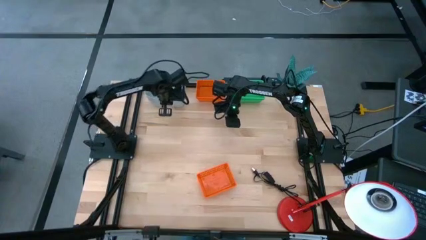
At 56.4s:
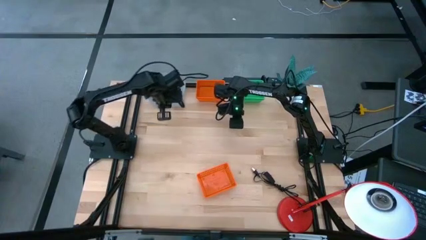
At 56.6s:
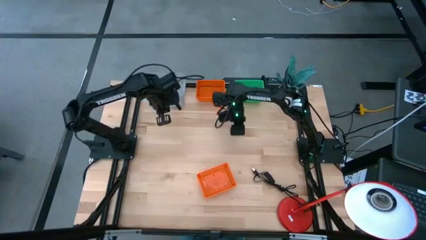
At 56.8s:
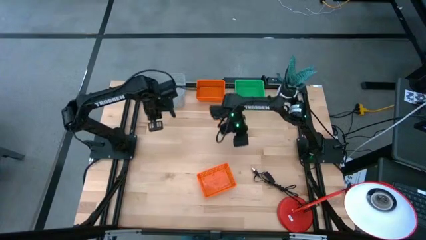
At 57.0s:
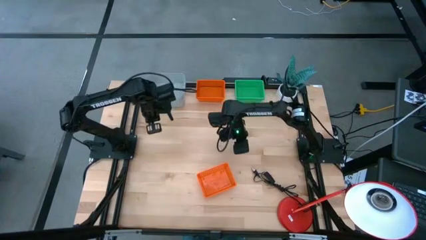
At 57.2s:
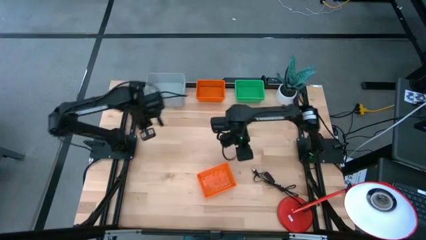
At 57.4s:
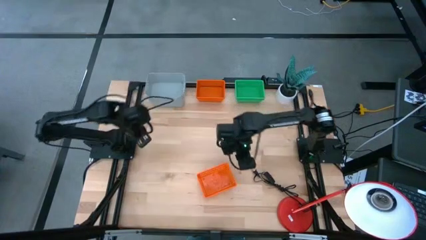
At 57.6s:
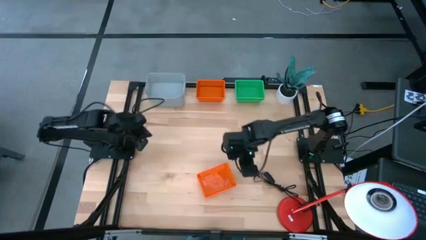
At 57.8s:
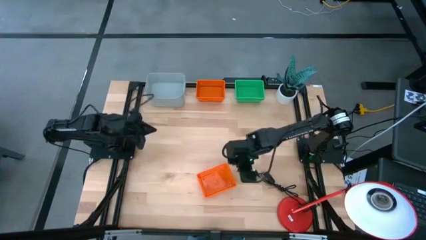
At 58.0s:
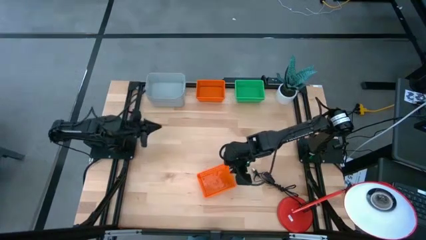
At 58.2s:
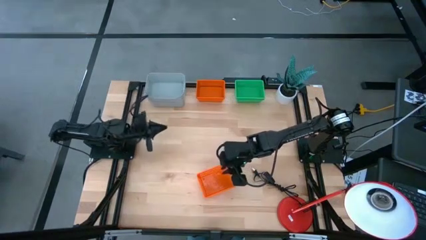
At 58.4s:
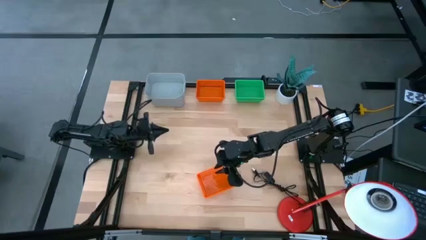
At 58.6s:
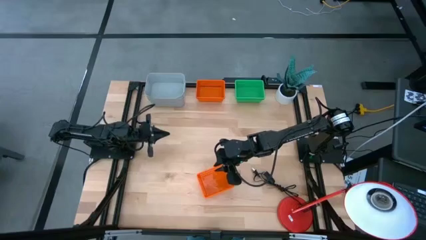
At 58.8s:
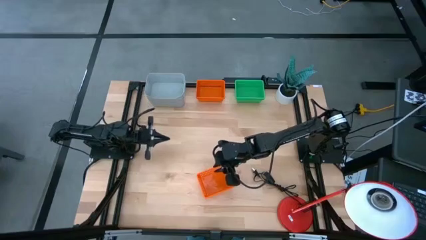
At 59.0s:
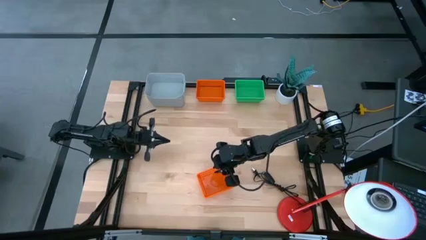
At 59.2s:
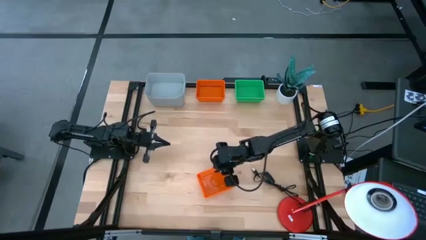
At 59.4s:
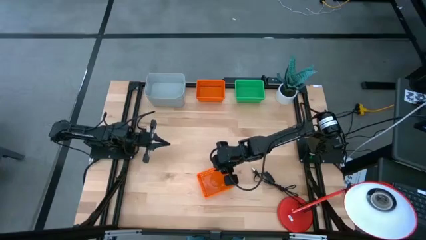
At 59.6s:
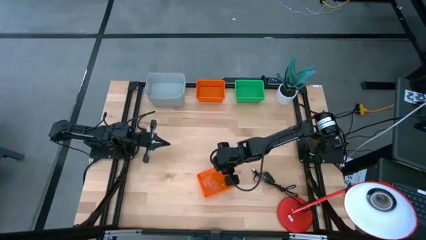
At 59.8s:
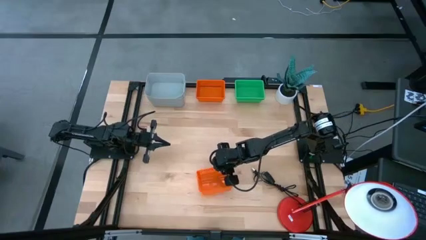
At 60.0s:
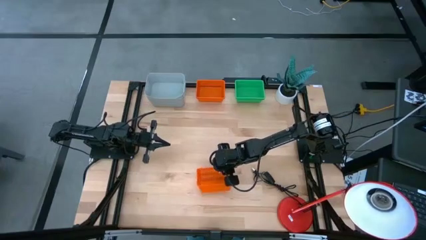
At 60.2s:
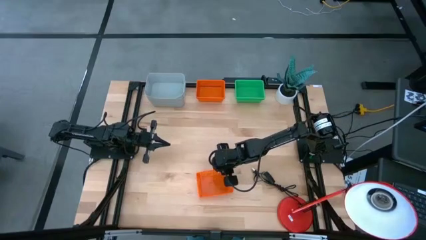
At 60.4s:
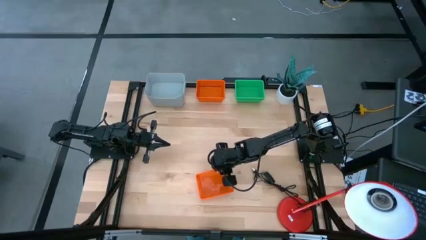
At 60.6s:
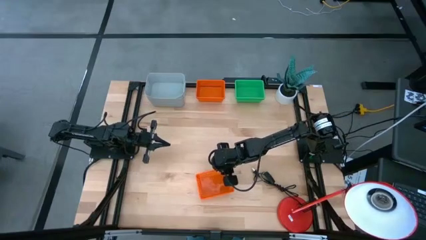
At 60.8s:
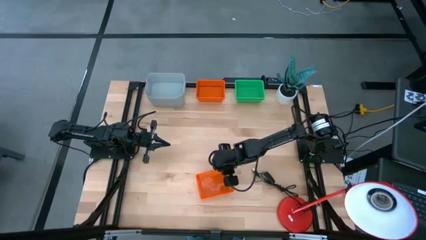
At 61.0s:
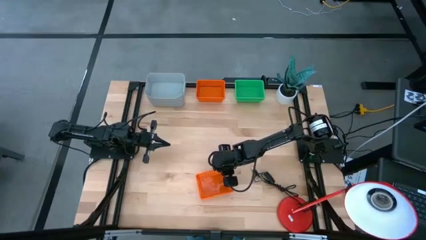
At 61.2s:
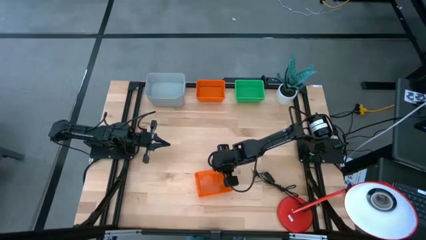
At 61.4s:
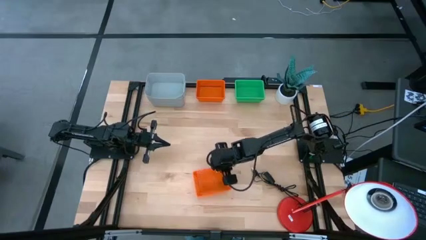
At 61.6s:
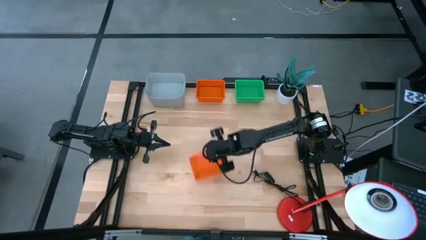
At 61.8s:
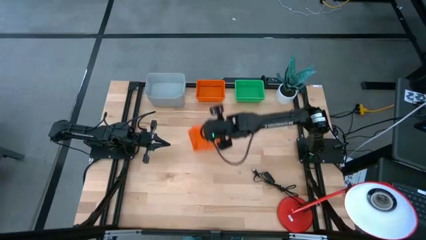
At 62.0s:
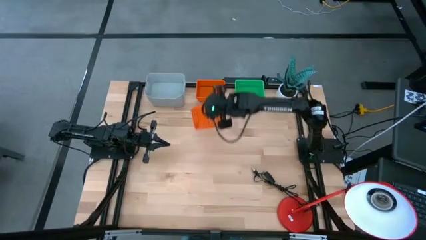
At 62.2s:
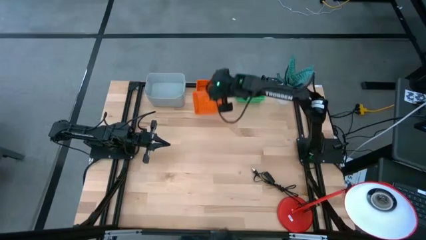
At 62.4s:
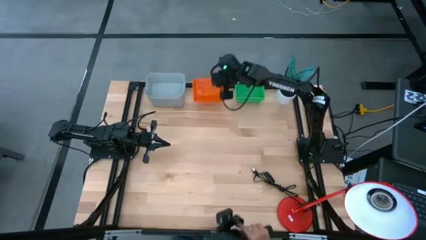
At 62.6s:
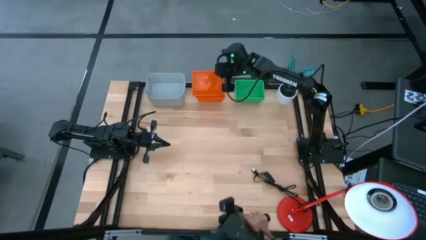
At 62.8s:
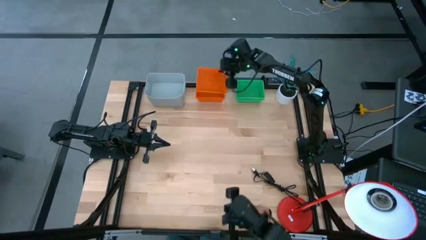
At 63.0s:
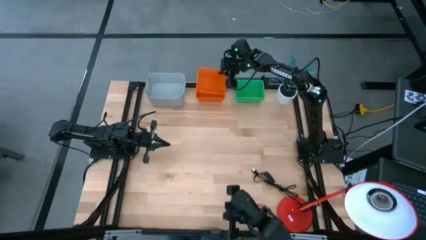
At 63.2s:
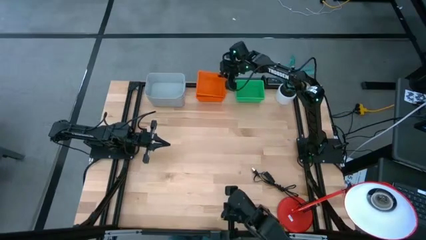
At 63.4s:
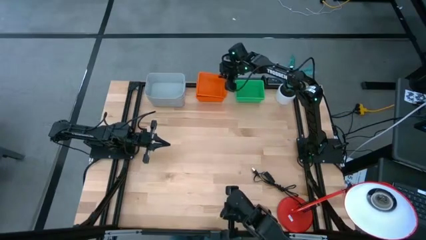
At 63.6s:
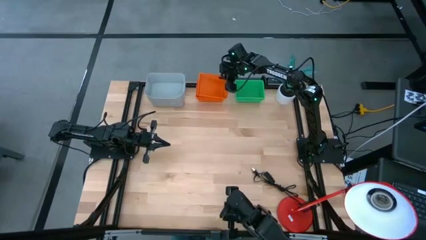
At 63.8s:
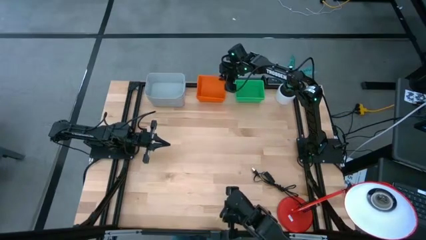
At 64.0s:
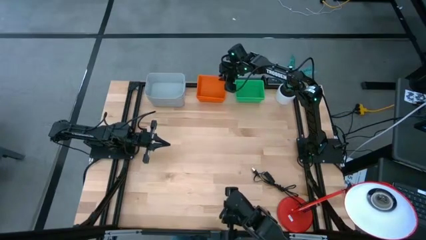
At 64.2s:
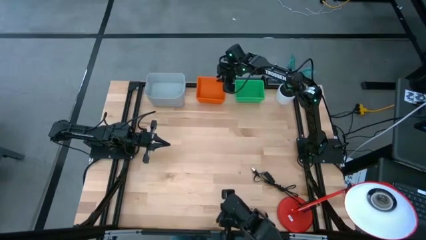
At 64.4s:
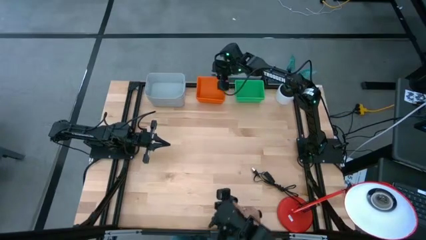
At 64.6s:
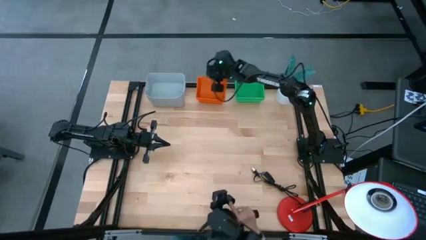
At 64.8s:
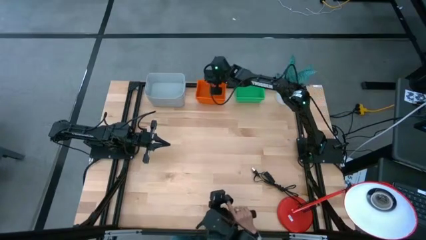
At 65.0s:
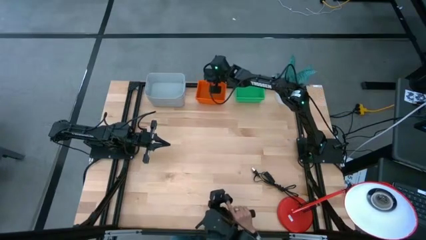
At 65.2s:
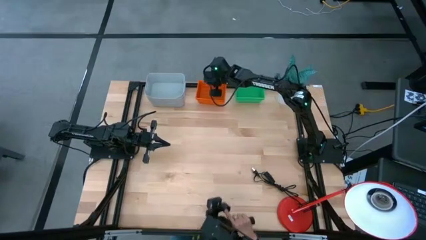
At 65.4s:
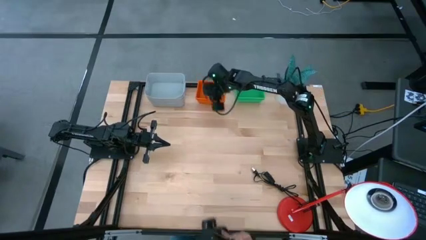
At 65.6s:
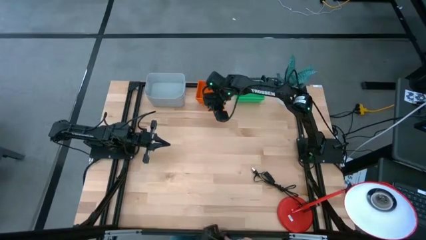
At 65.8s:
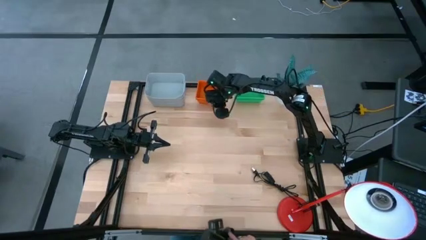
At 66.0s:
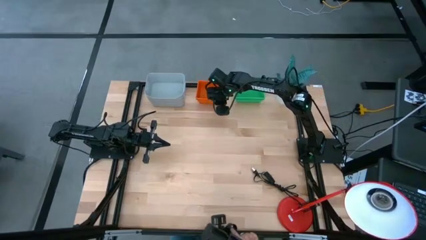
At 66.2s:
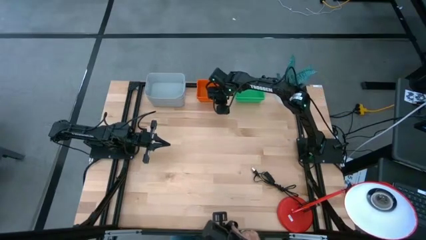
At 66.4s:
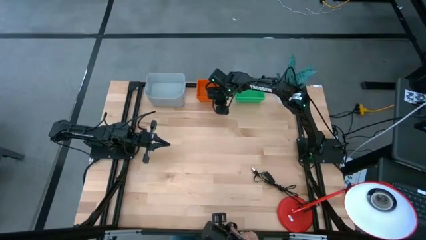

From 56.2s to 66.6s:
Stack the bottom orange bin on top of the top orange bin

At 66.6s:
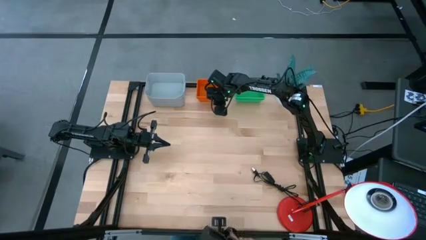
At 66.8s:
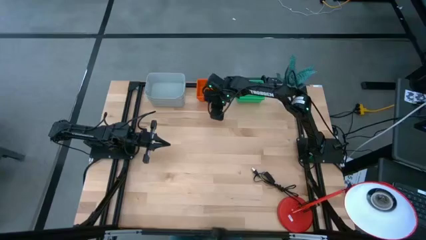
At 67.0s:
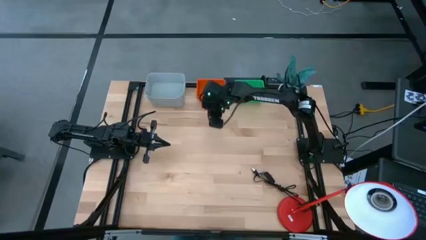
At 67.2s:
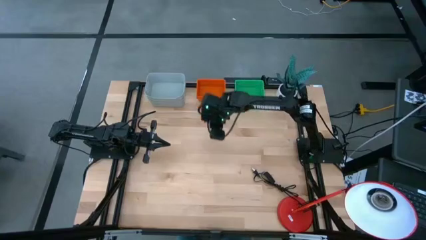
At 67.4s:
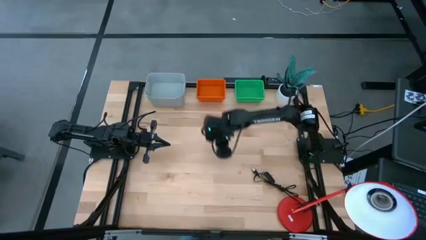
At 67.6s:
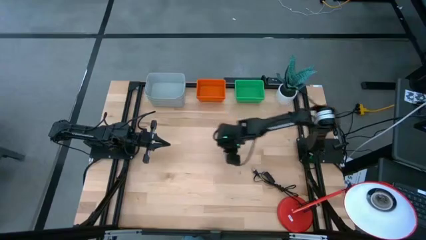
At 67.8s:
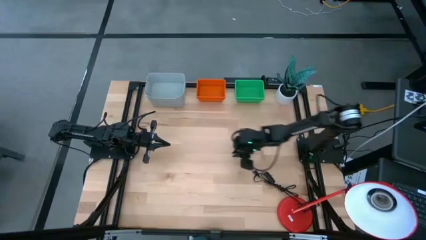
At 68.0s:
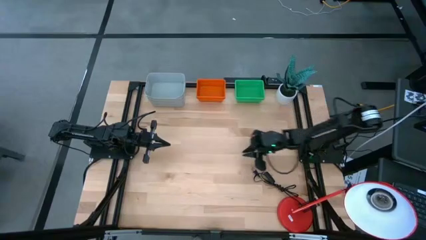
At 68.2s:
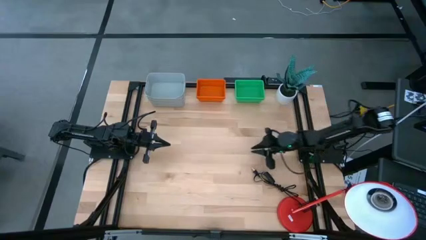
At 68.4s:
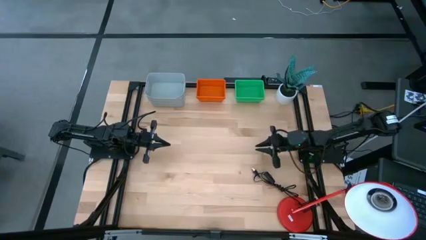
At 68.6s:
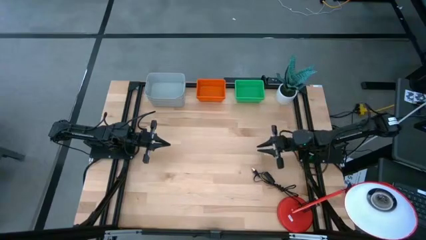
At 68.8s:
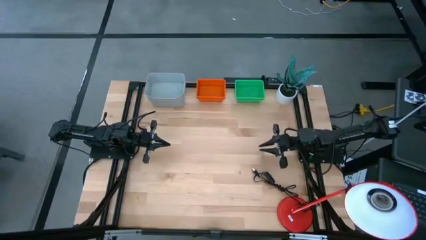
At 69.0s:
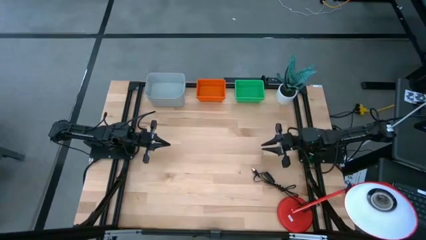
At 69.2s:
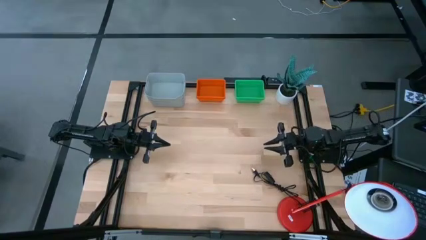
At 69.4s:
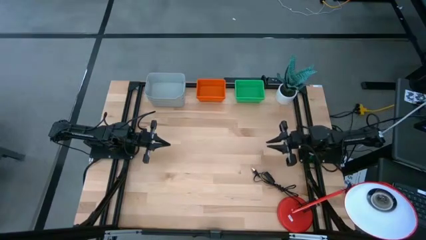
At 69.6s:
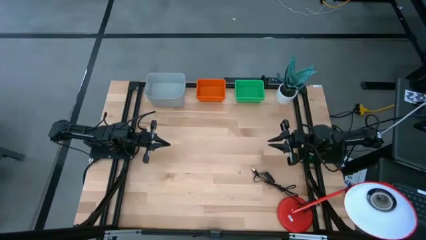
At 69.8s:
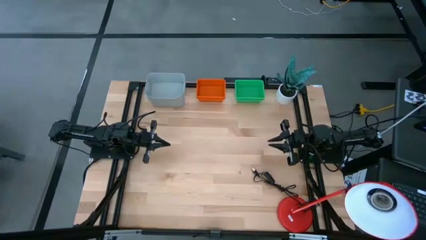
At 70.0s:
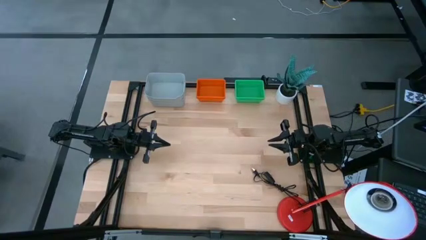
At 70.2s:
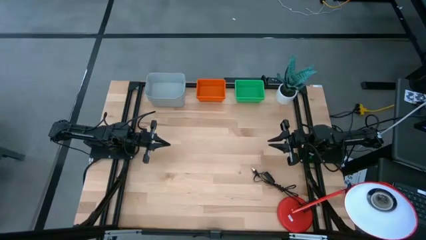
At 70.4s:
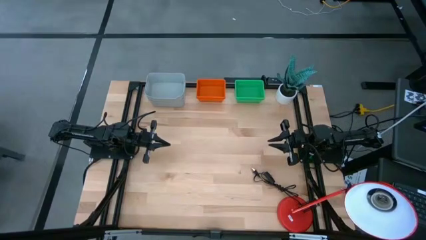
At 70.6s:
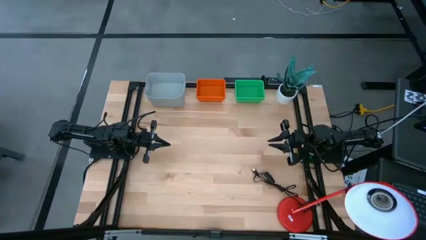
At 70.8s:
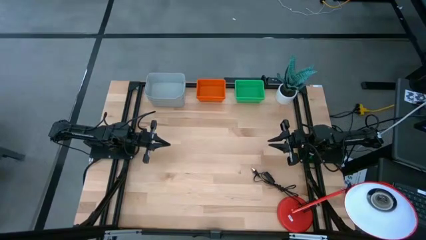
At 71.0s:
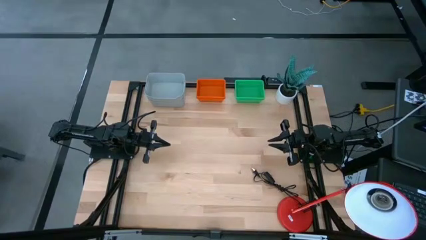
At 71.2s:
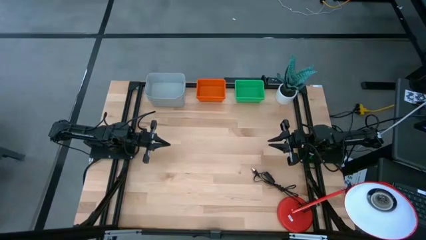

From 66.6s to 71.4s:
Return to Home Position
